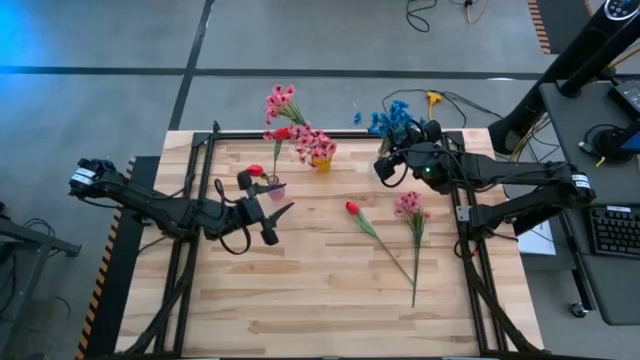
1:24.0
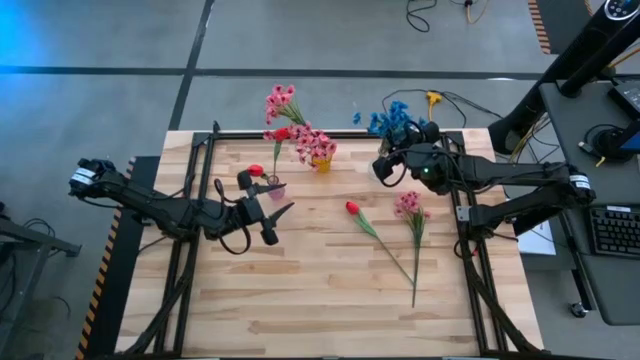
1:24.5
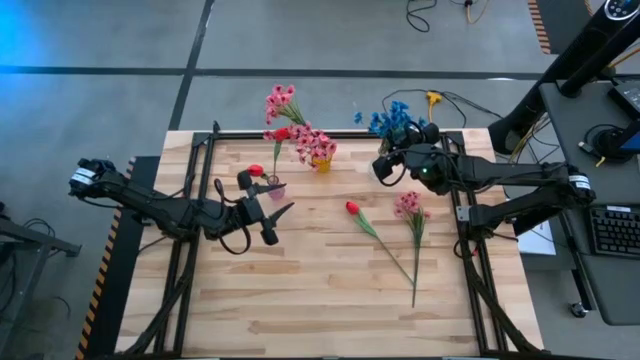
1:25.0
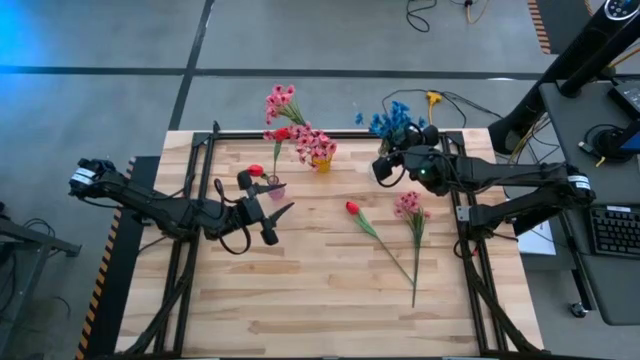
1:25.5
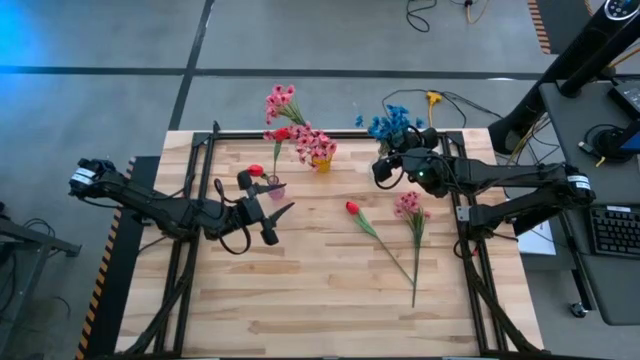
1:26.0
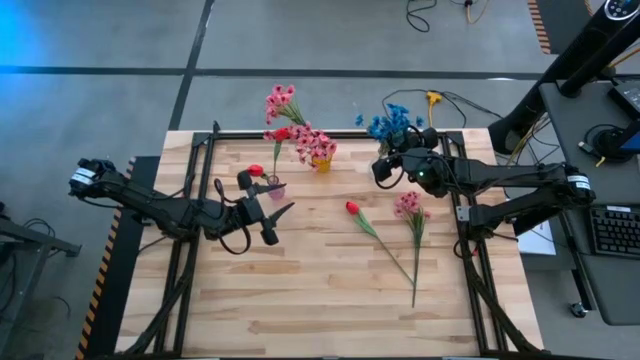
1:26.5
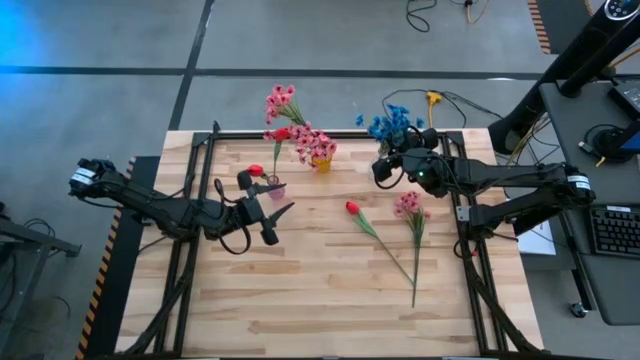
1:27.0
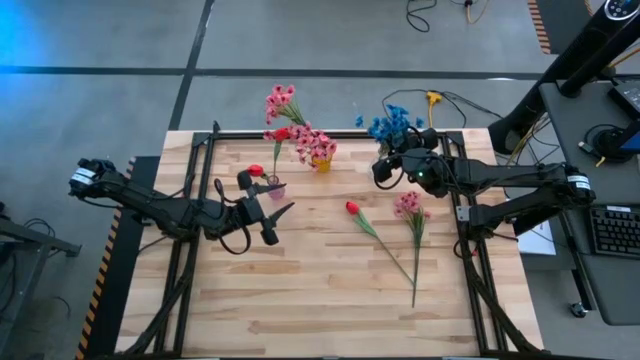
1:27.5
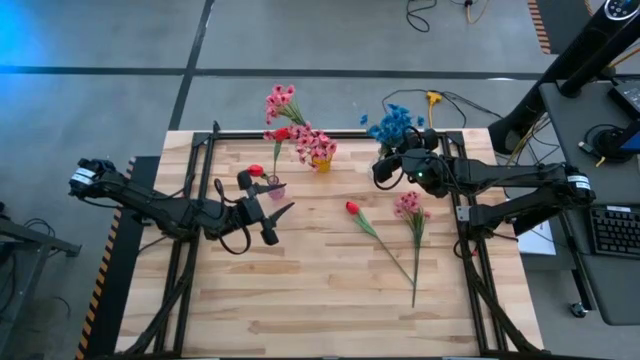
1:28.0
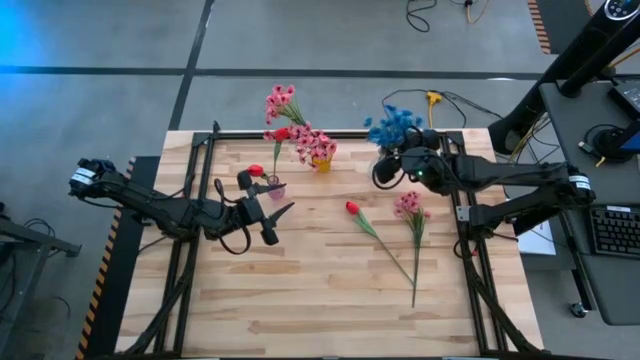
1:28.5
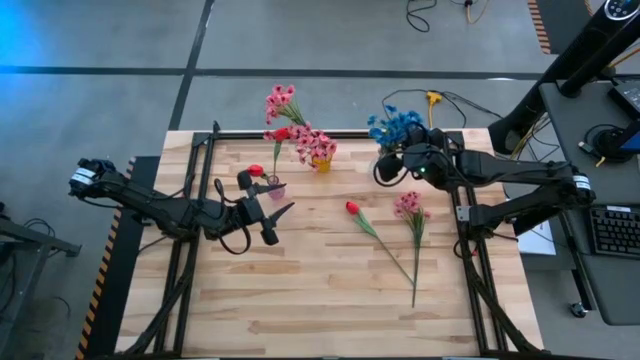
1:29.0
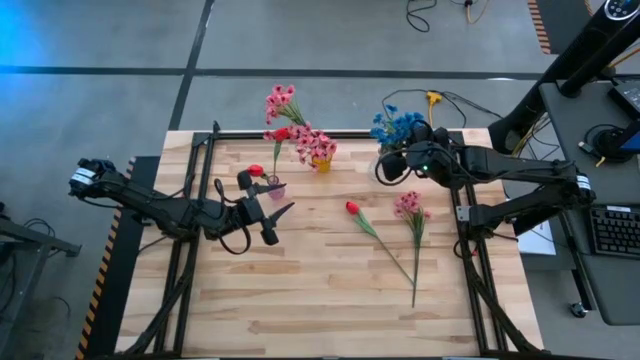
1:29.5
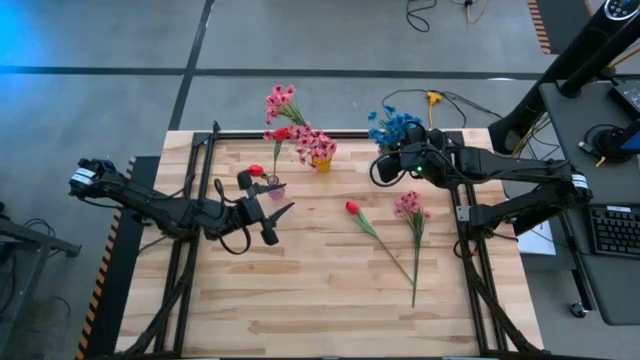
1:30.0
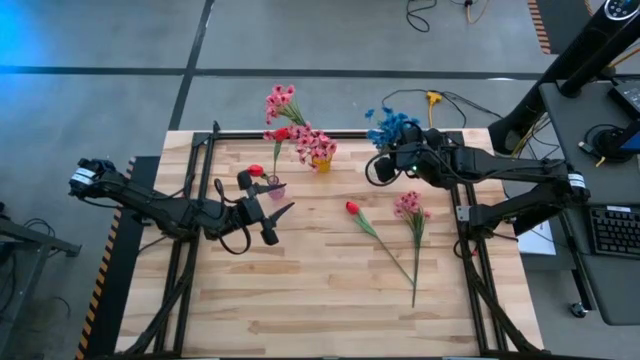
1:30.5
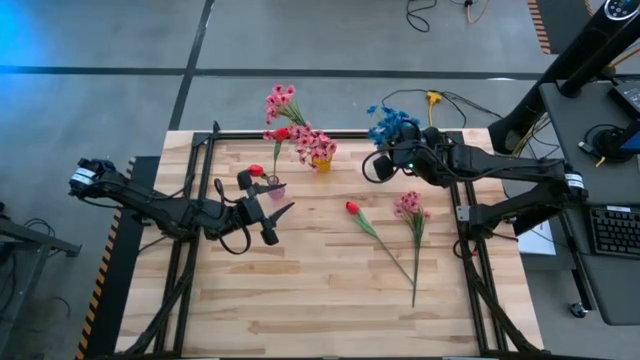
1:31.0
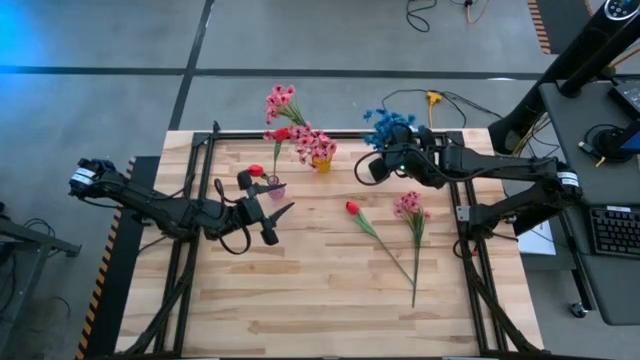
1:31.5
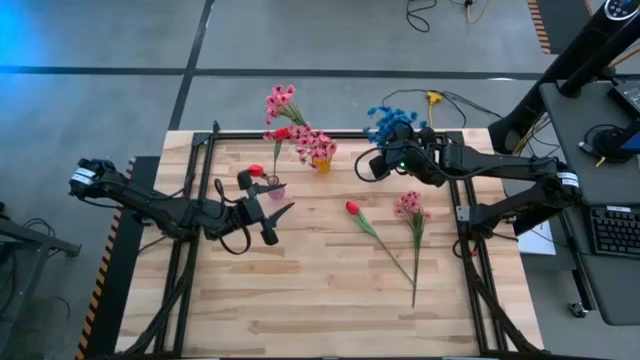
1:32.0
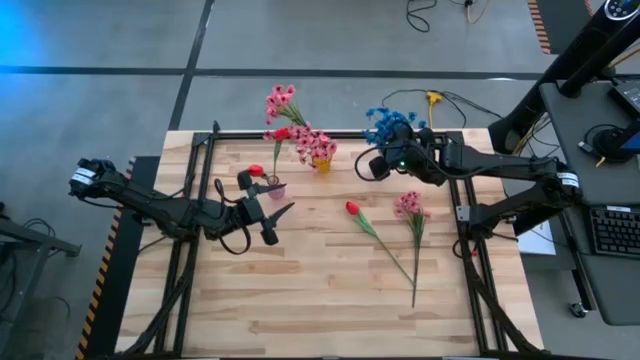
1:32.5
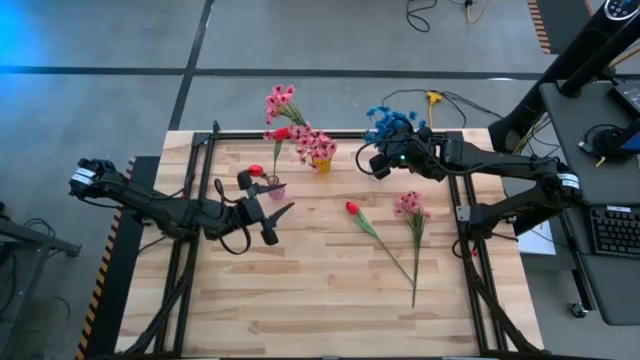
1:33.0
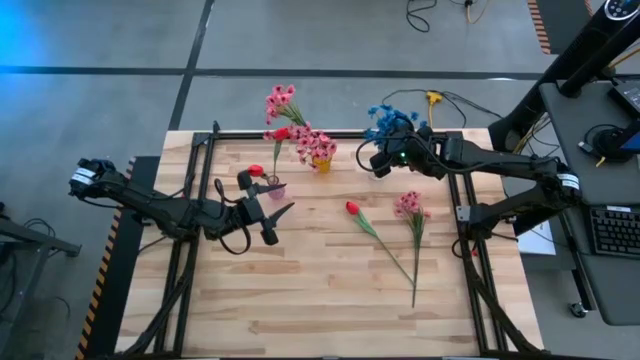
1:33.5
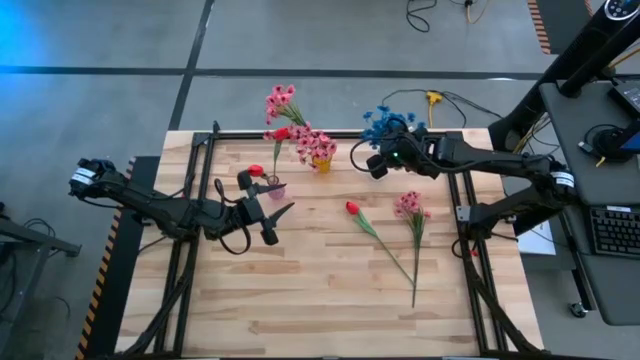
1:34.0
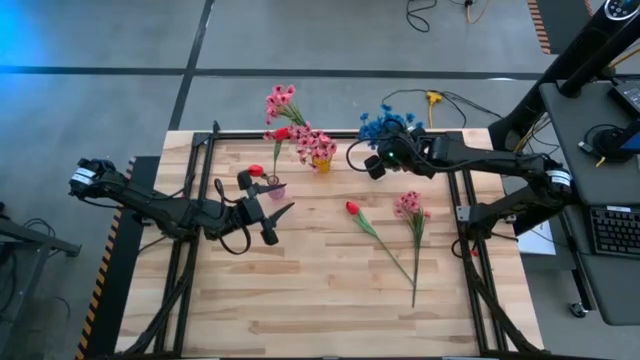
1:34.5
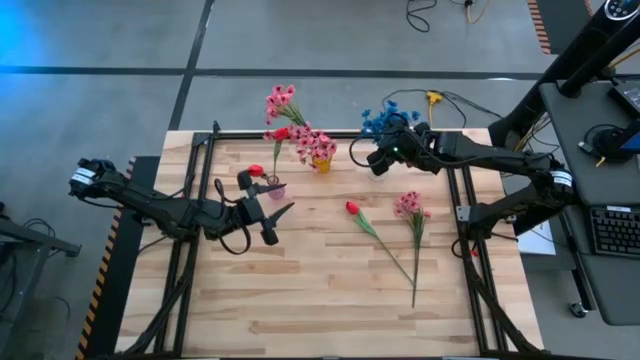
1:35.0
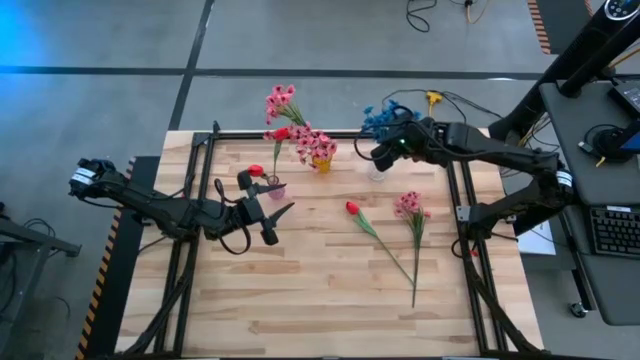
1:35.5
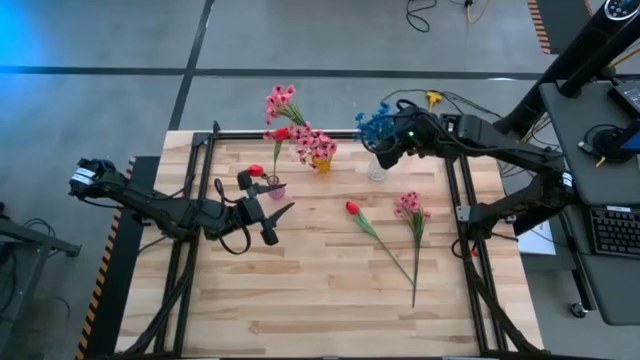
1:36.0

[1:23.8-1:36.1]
Task: Sort flowers into vase by color
Put the blue flowers into the transparent vase

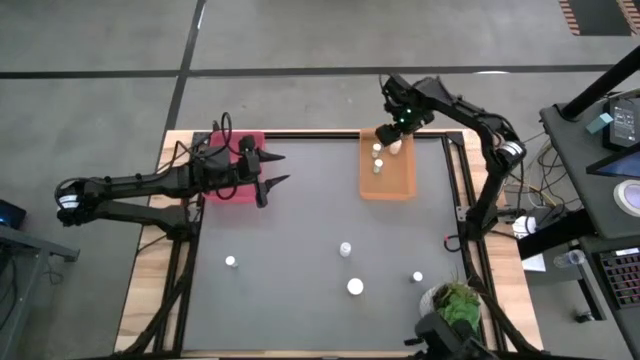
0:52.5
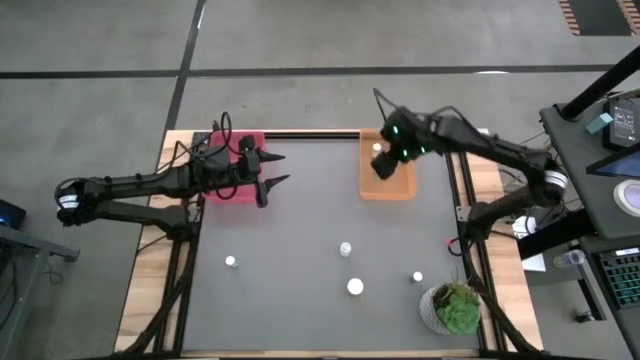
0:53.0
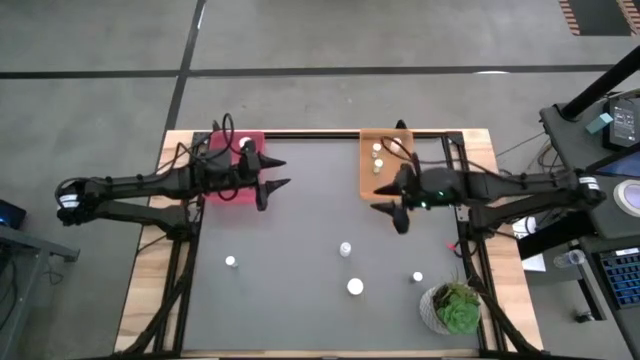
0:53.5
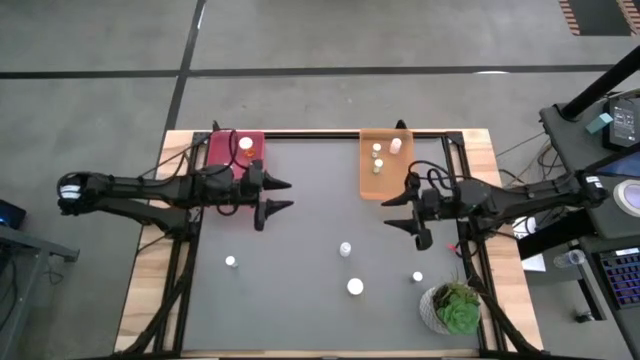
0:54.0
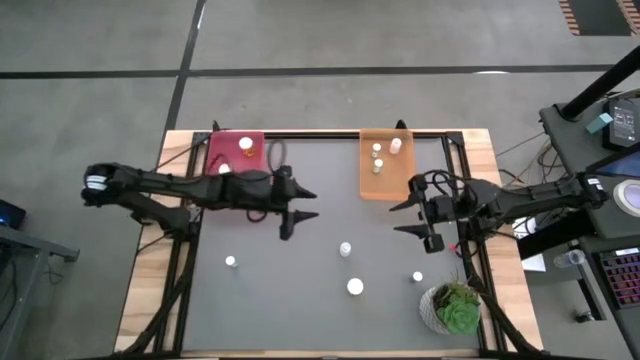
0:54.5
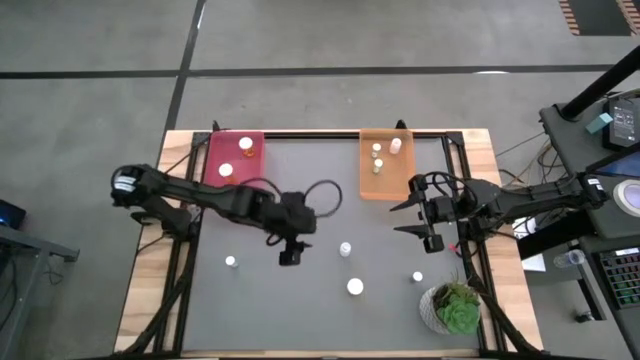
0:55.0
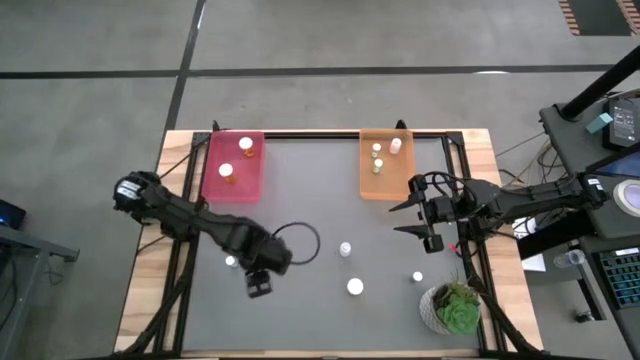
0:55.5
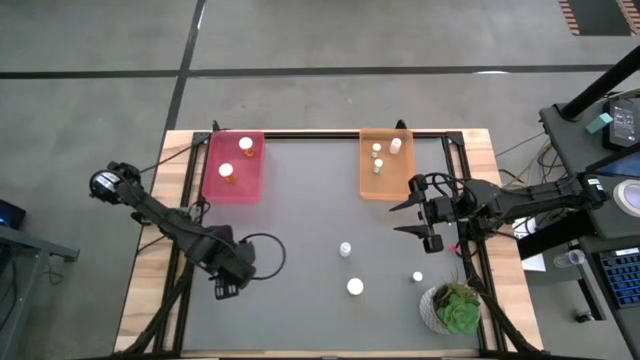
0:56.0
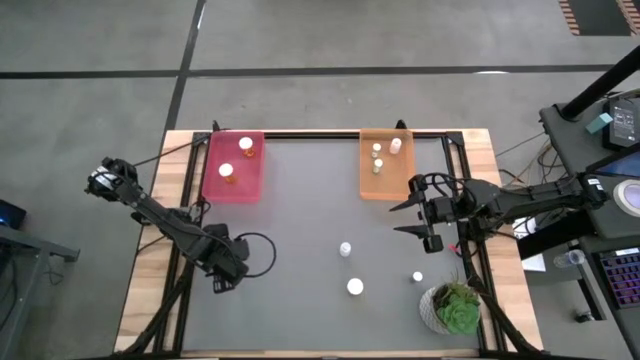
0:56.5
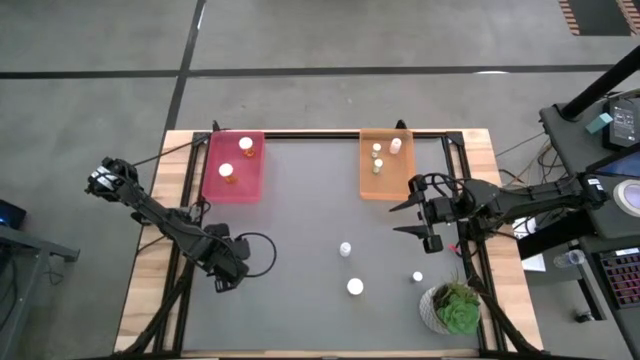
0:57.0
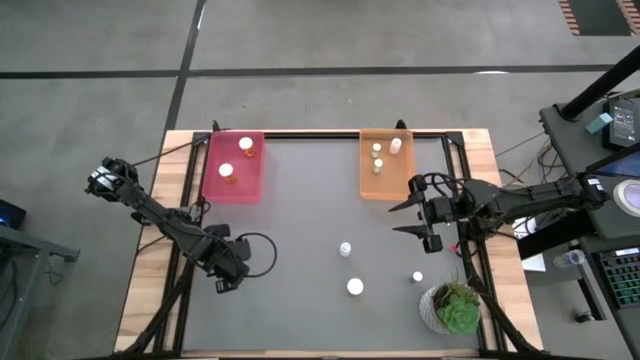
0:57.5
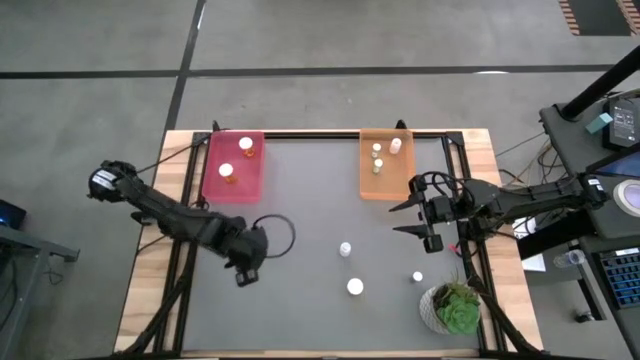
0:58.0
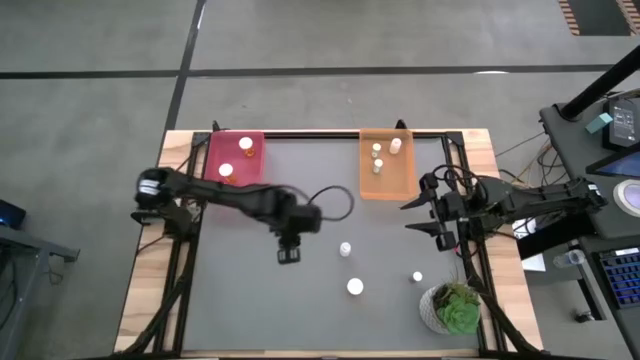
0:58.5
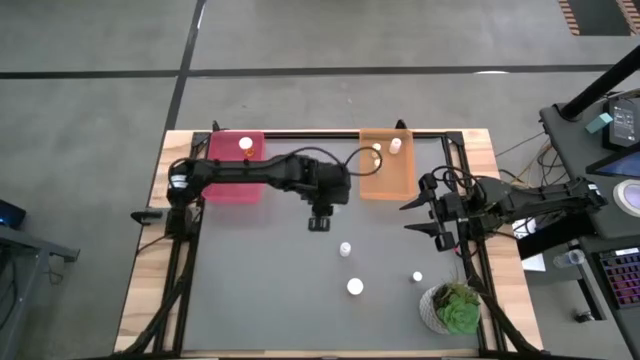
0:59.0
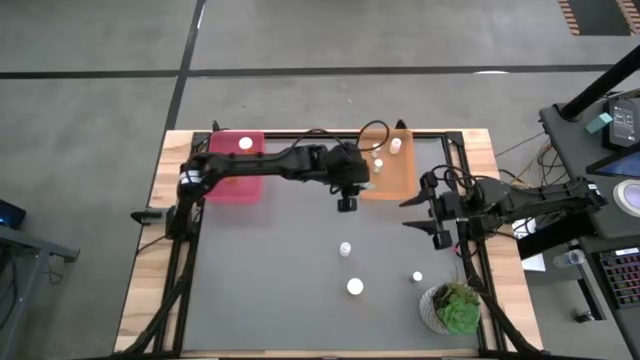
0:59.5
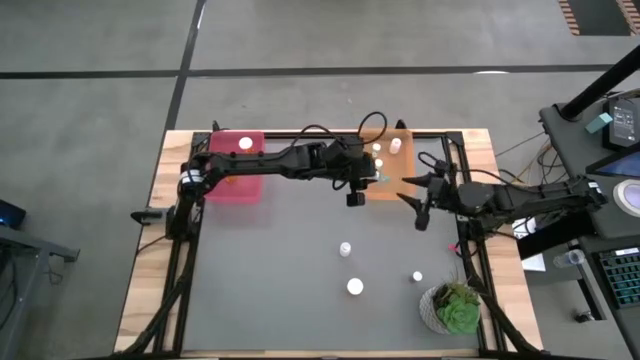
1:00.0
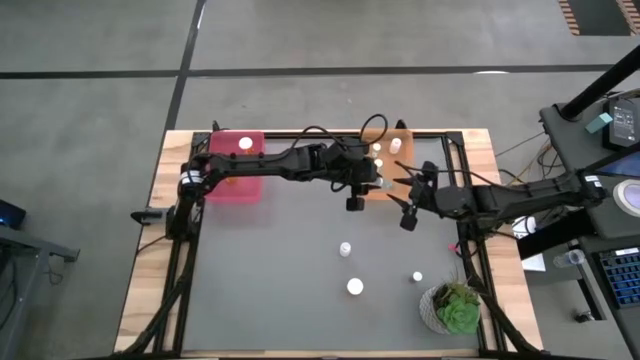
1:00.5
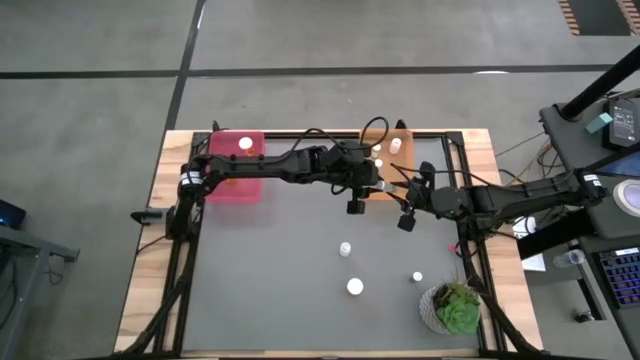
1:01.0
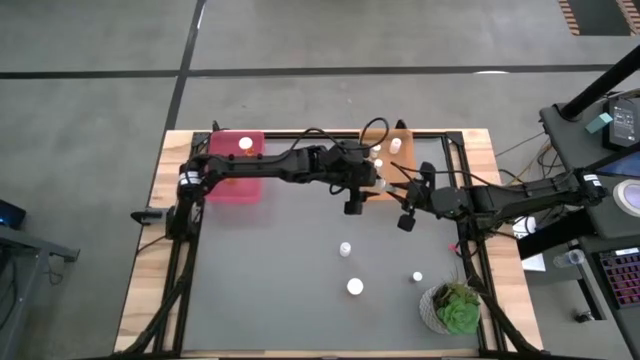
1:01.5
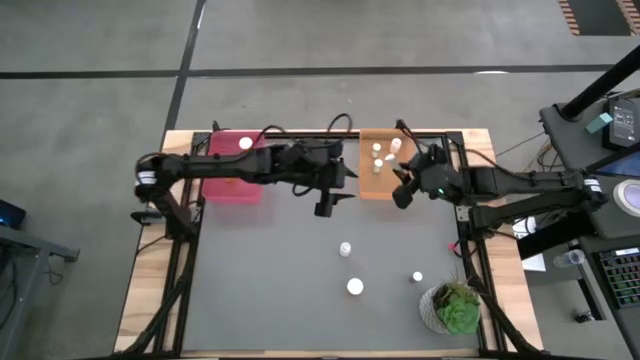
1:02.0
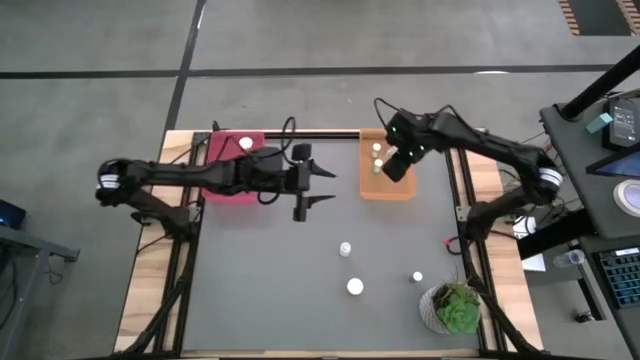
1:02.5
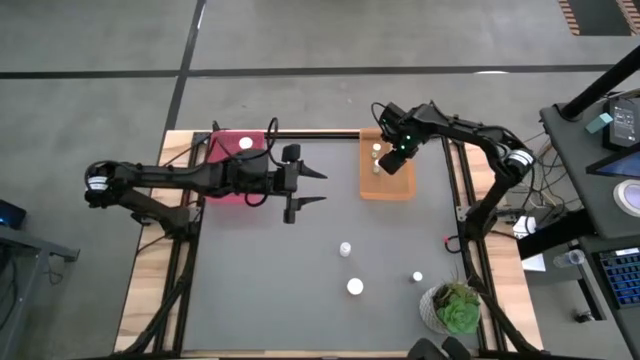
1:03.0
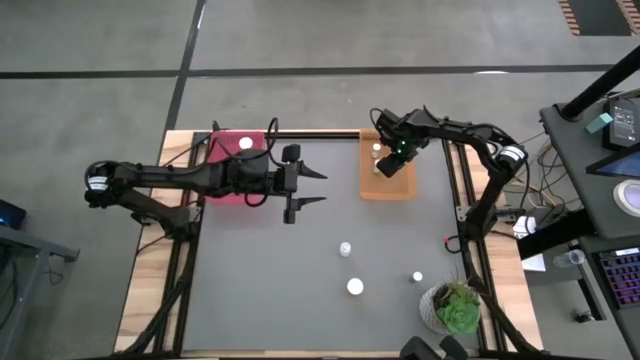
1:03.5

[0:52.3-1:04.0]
Task: Pick and place medicine bottles into bin by pill shape (circle, oval)
Put the blue tablet bottle into the orange bin
